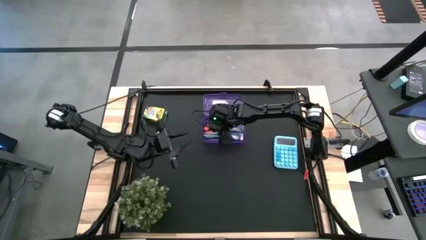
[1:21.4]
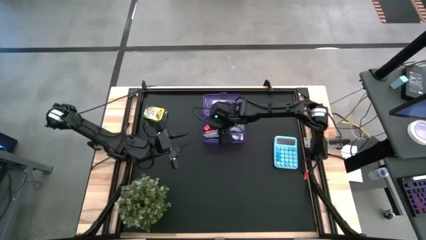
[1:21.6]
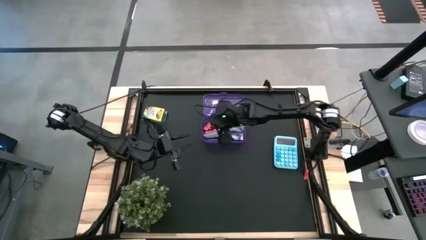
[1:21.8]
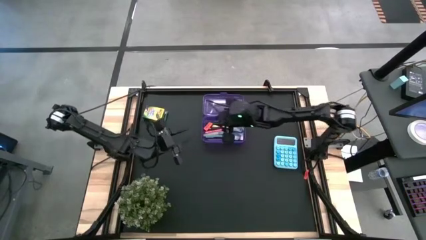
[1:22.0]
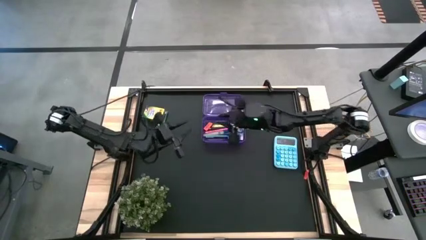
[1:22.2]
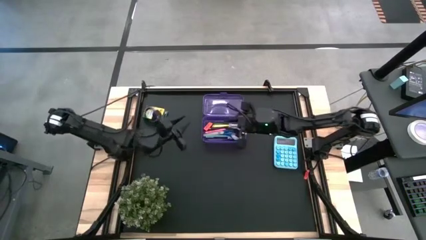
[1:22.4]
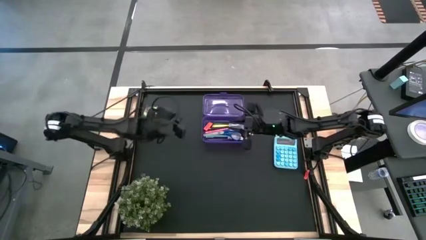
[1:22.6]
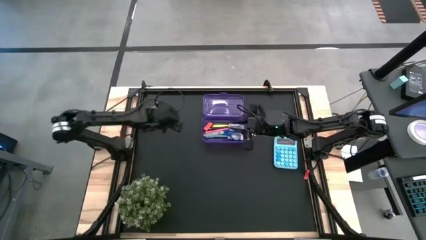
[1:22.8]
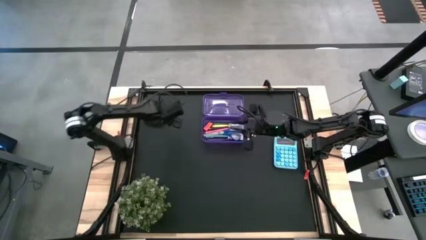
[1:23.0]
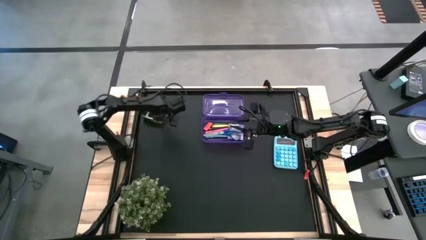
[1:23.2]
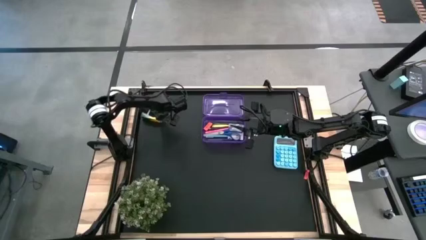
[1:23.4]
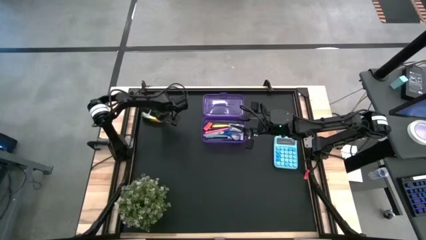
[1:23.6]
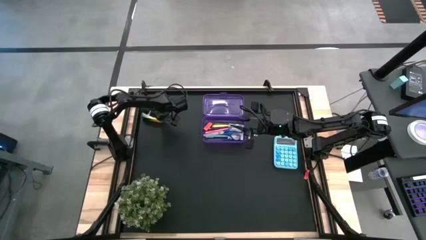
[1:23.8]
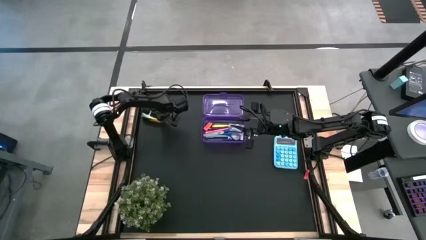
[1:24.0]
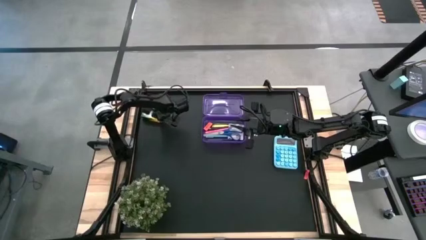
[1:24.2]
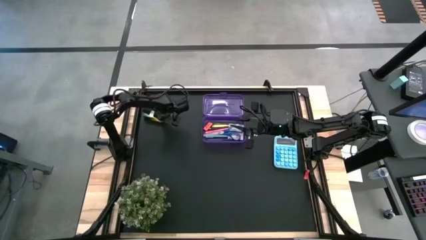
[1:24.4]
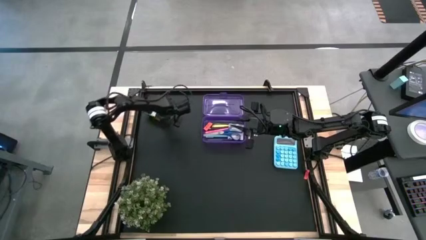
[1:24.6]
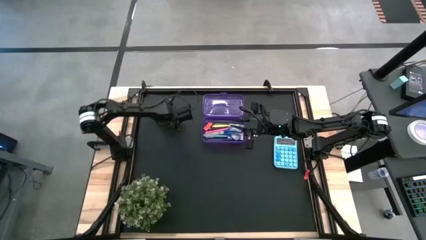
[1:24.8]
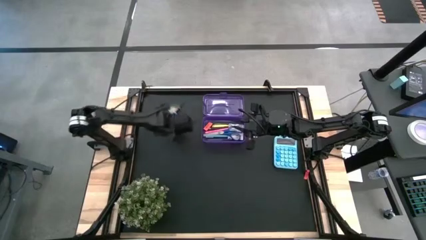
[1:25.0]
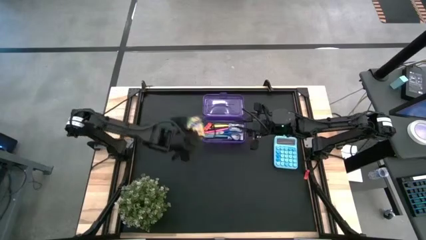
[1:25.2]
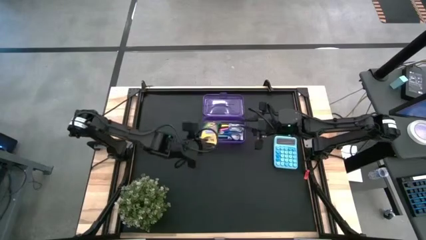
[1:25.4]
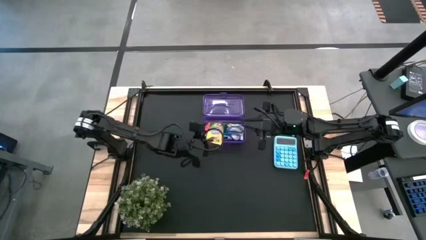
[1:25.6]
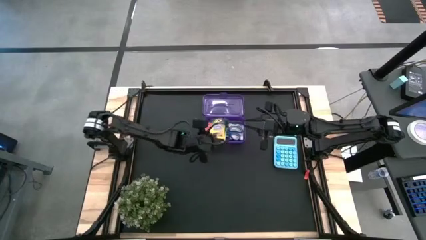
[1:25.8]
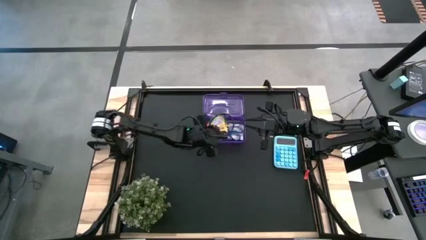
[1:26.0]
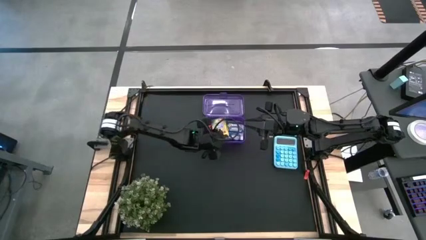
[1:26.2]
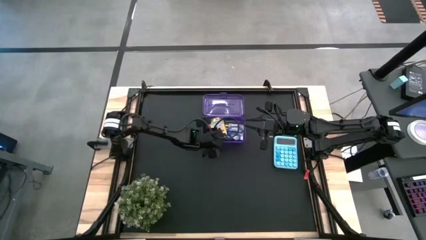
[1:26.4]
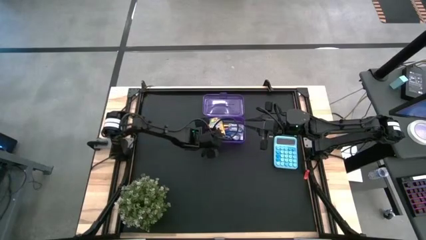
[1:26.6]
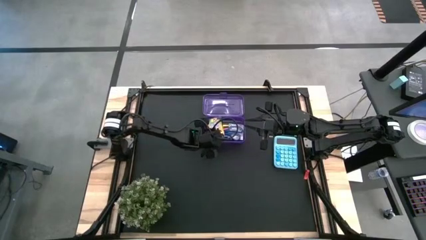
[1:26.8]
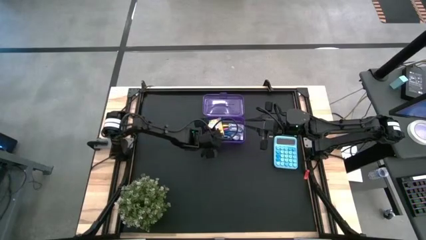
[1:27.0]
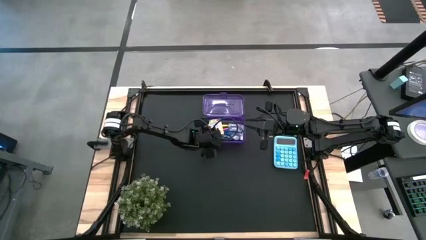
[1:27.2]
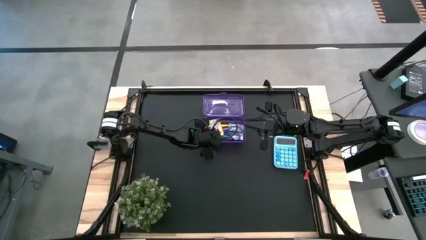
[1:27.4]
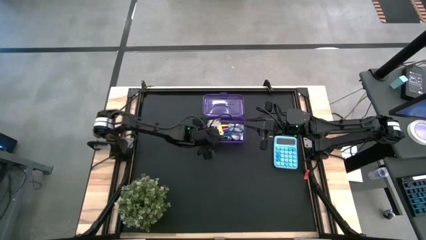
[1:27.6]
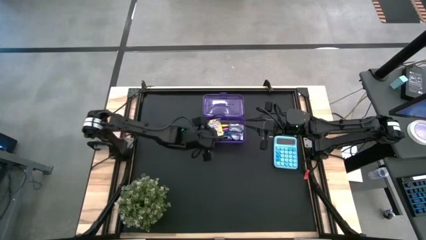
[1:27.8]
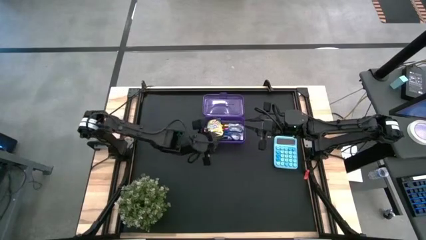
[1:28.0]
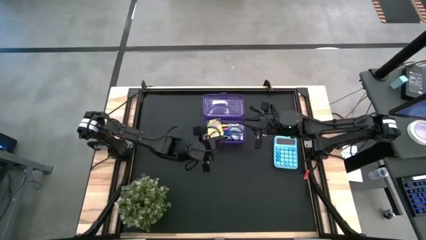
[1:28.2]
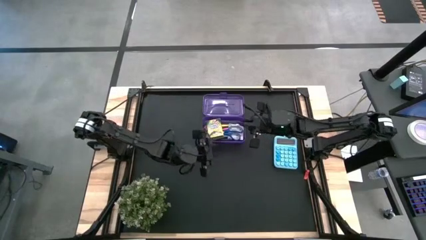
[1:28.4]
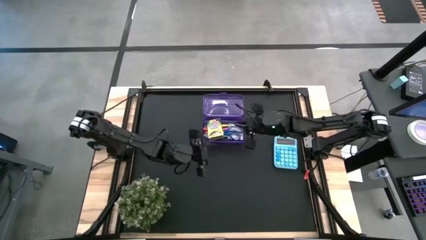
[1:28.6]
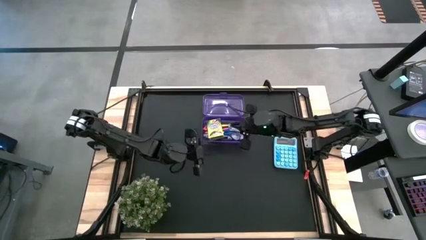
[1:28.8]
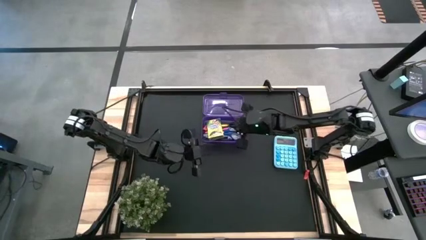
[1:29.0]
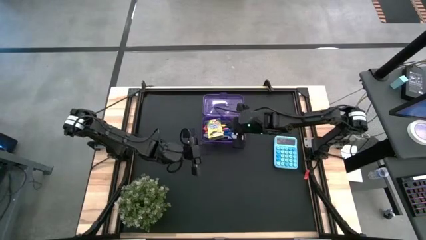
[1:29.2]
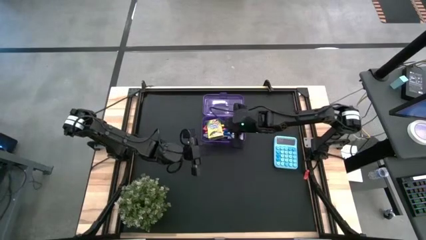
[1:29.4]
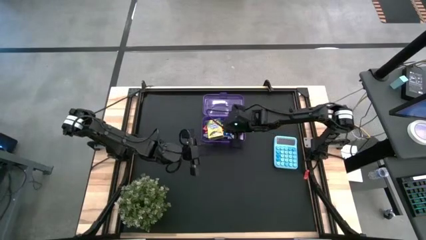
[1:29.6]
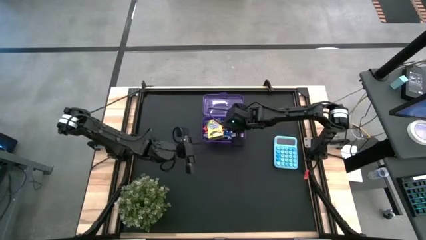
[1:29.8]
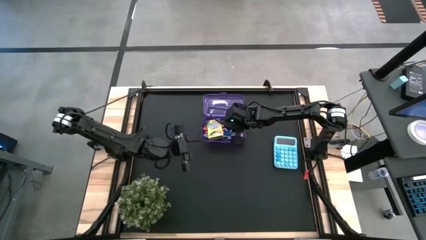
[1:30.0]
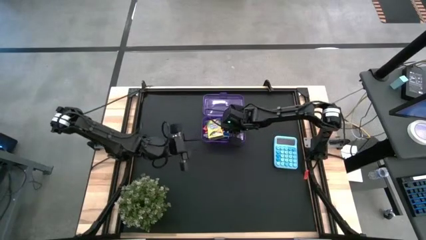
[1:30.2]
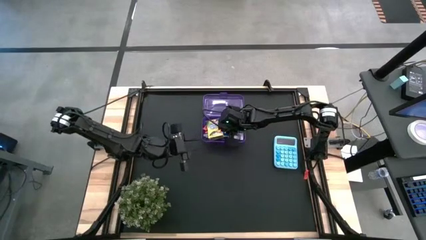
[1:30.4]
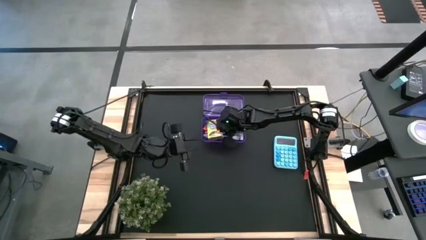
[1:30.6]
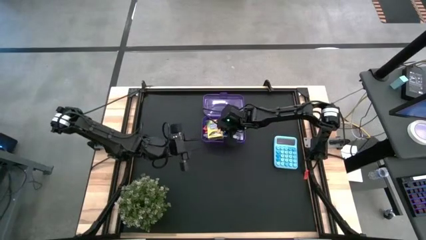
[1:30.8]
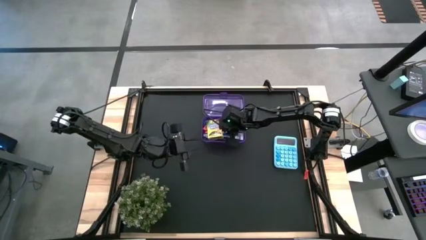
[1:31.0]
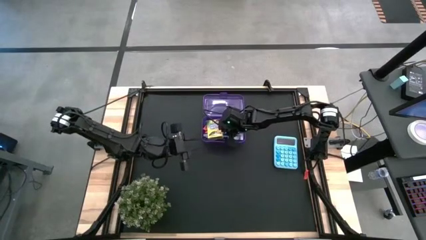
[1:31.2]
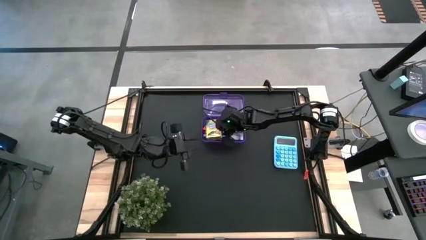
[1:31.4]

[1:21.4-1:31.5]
Task: Pack school essentials
Put the box of crayons into the purple box

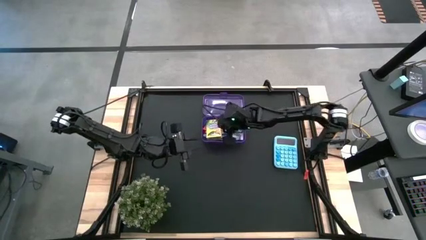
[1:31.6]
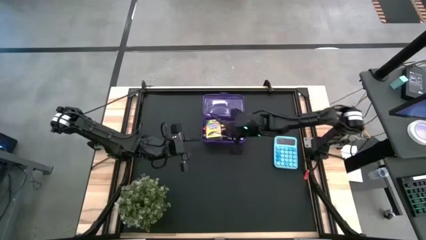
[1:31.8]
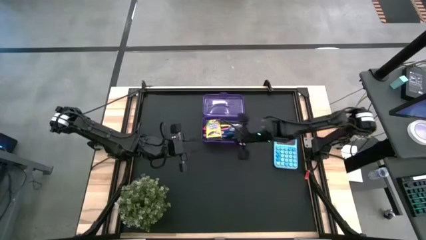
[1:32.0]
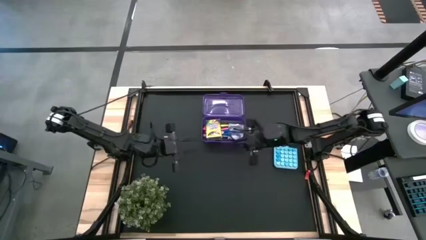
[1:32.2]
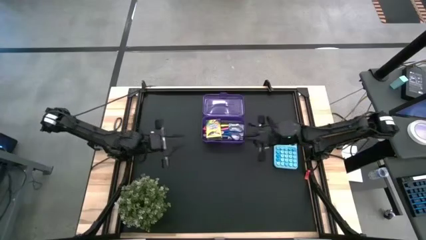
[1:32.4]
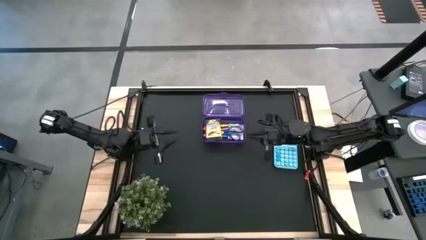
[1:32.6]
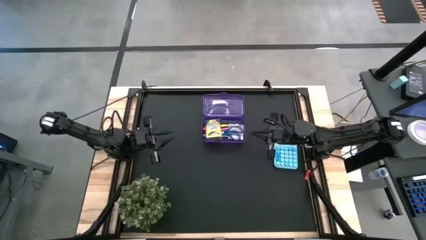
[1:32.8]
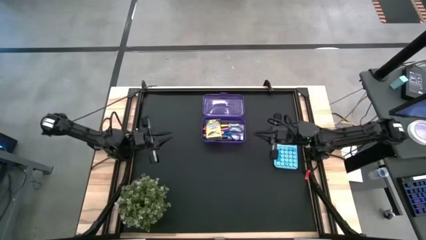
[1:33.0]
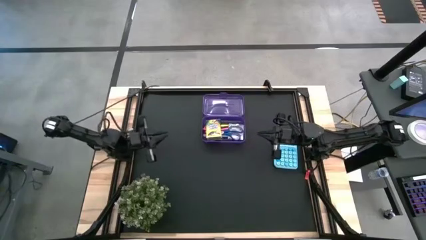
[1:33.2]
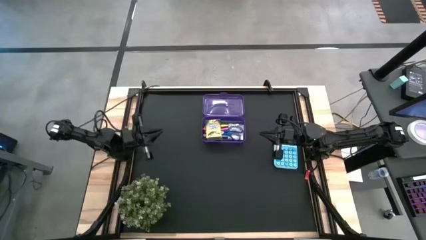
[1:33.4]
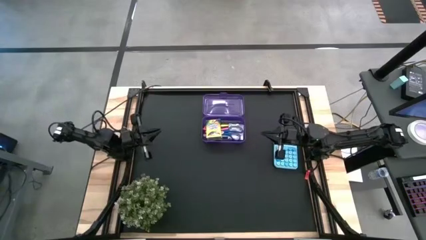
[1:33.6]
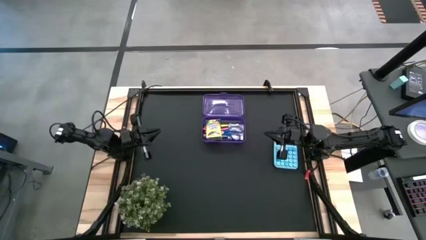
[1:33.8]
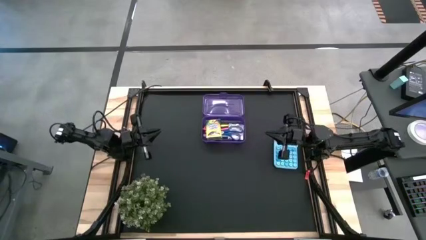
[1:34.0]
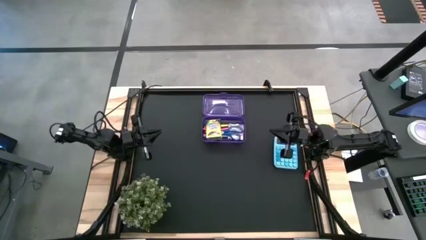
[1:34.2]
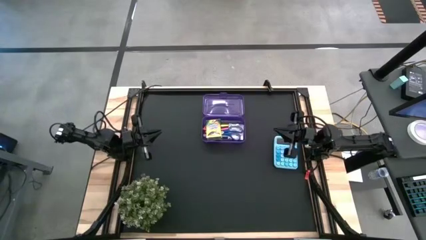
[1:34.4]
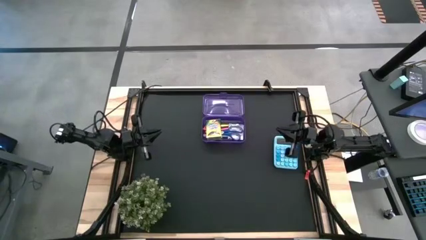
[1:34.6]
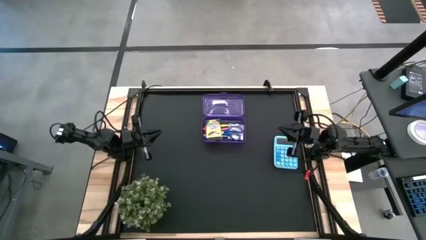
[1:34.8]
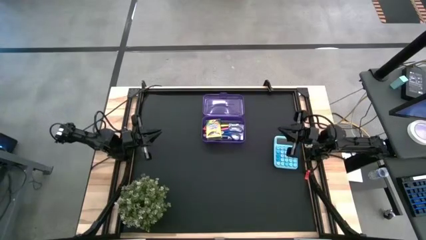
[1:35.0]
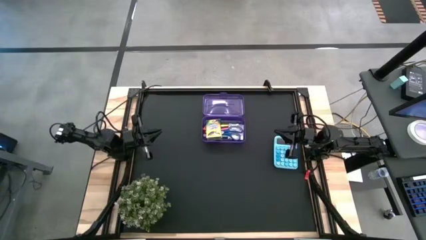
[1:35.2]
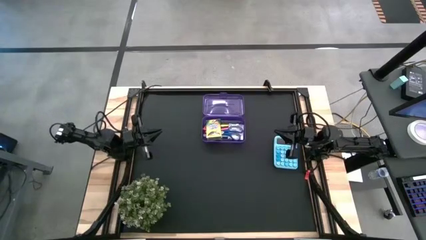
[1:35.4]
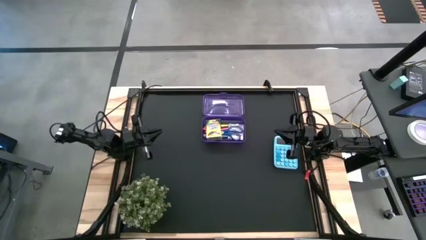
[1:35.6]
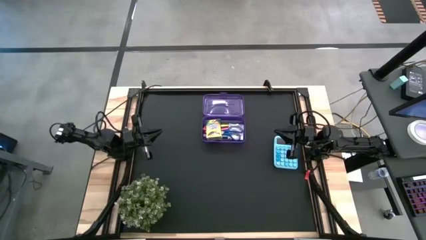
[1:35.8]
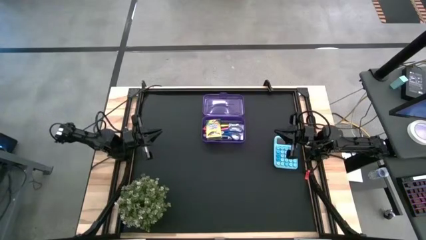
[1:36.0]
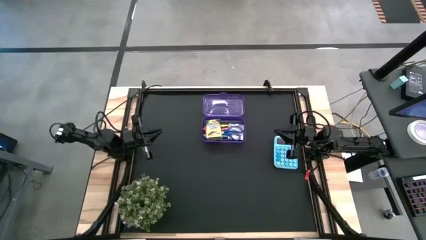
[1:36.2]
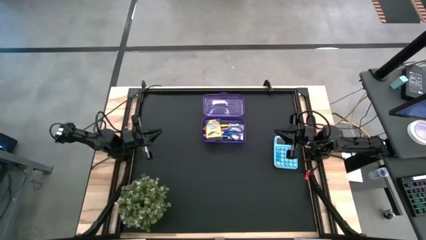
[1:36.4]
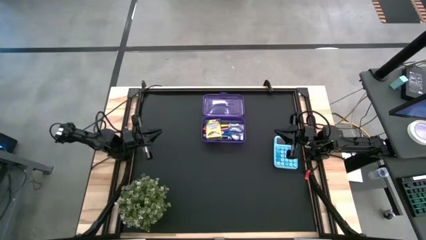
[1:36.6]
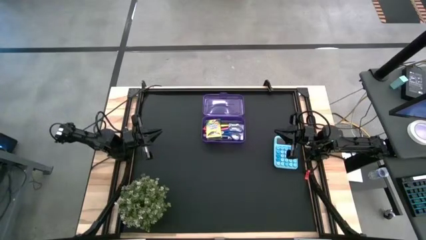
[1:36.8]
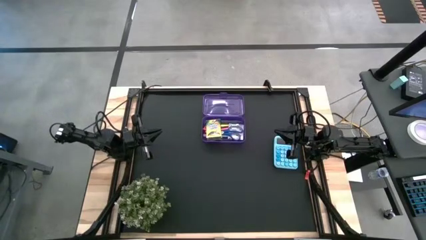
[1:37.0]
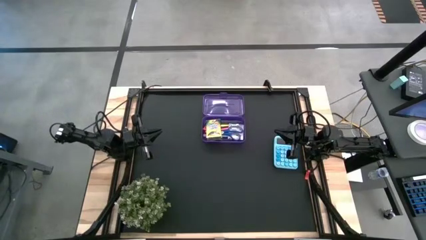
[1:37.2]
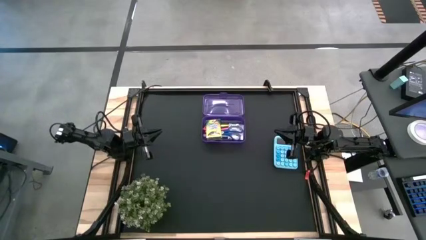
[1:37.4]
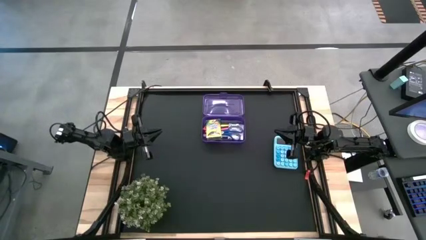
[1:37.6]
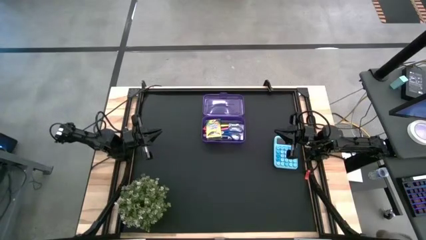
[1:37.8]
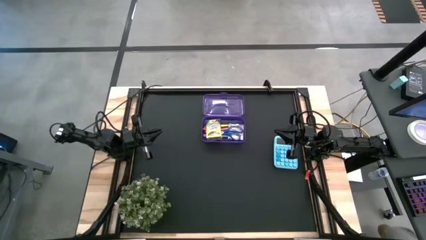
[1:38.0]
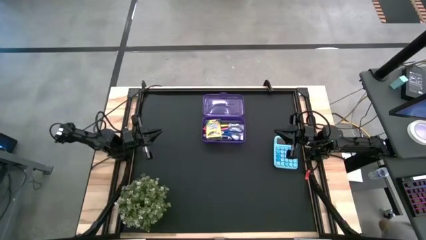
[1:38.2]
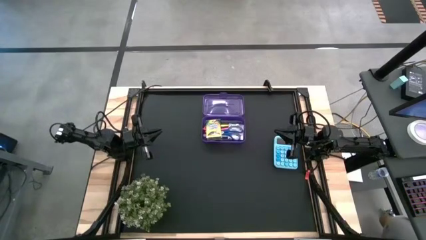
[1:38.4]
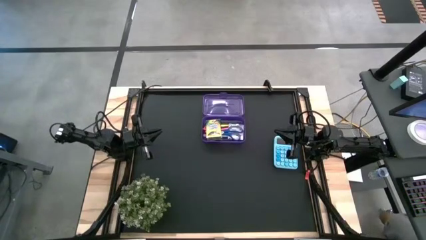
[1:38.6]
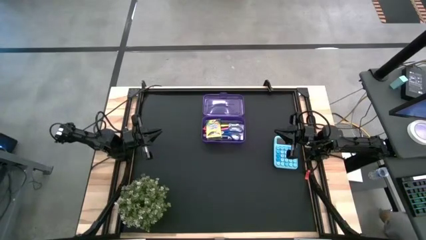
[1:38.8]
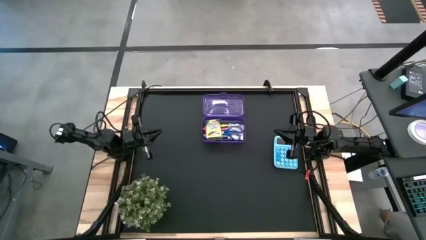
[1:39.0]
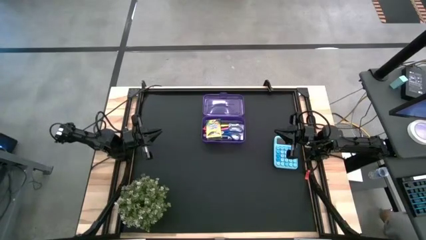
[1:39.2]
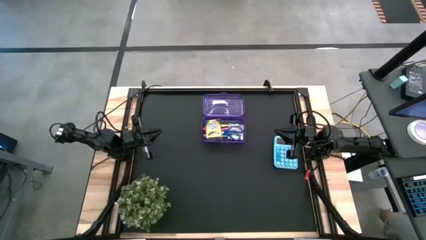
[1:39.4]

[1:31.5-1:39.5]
Return to Home Position
